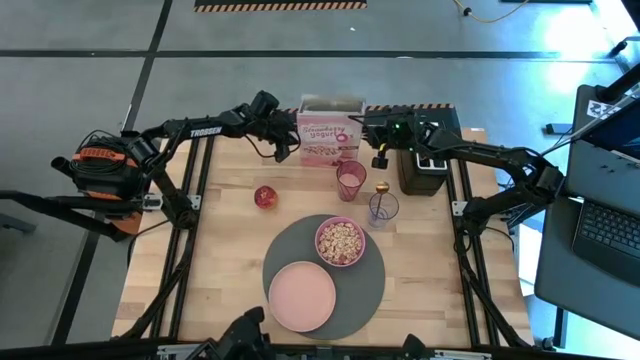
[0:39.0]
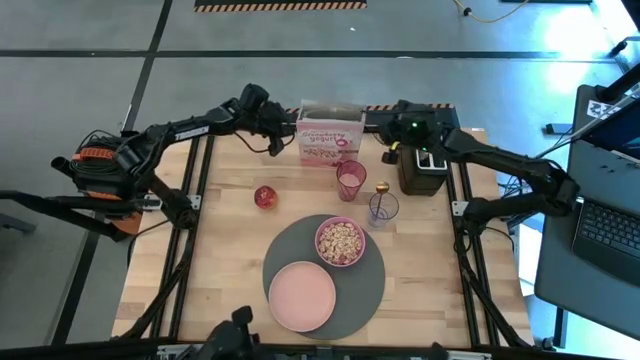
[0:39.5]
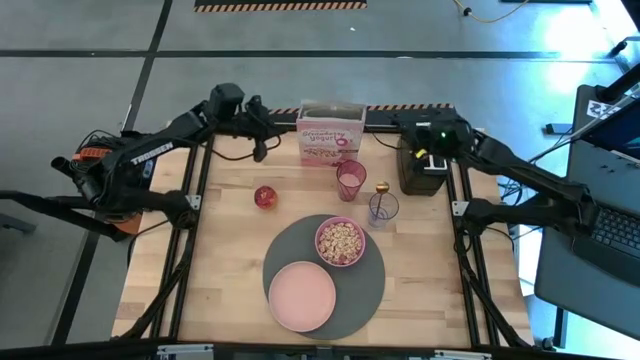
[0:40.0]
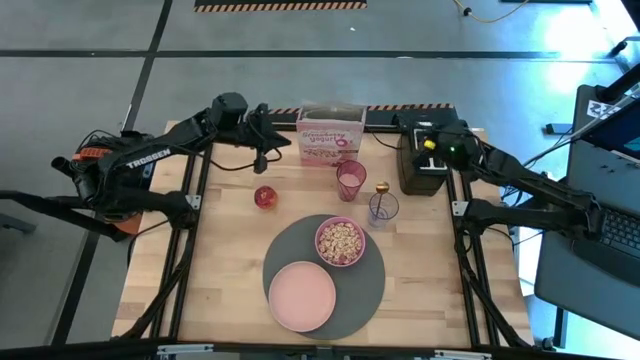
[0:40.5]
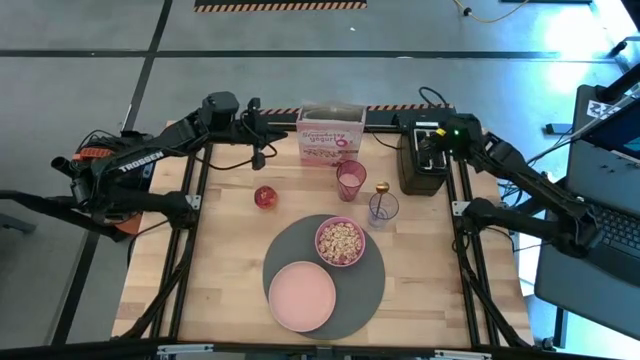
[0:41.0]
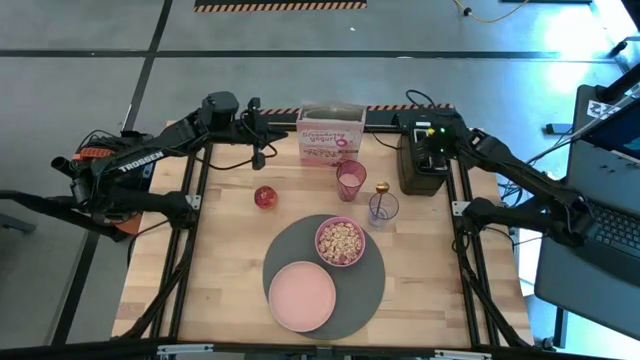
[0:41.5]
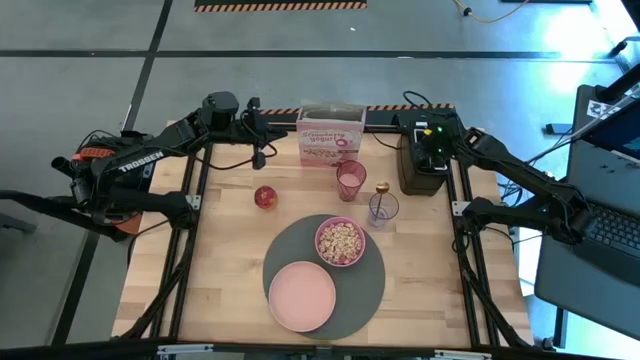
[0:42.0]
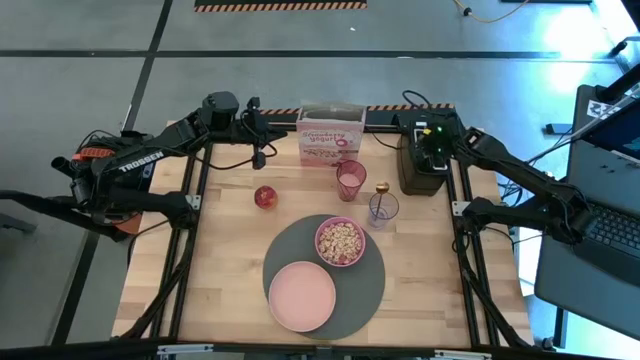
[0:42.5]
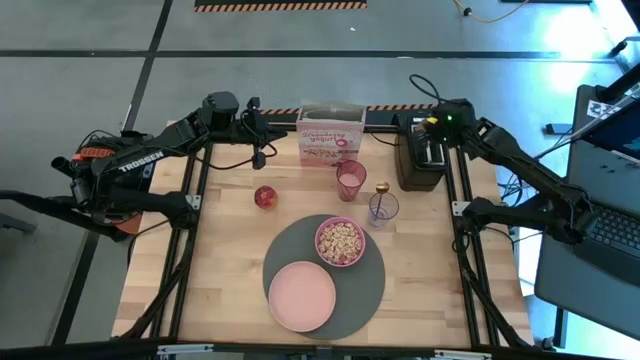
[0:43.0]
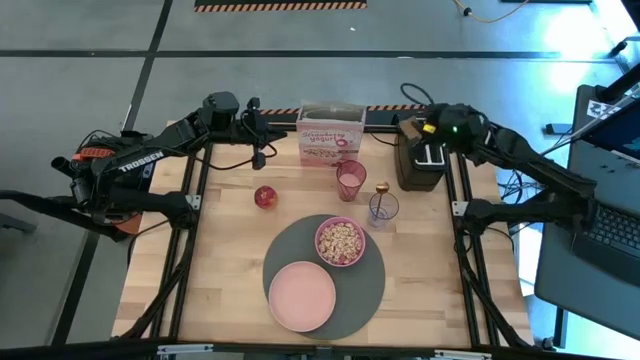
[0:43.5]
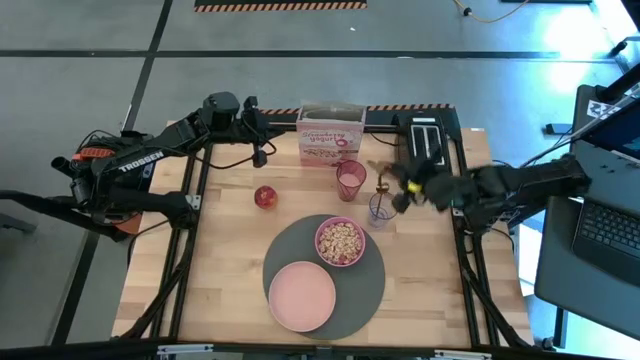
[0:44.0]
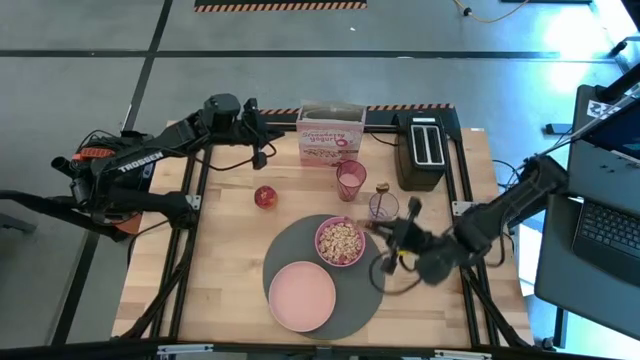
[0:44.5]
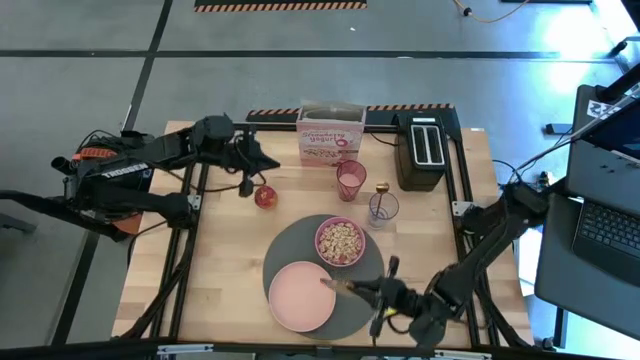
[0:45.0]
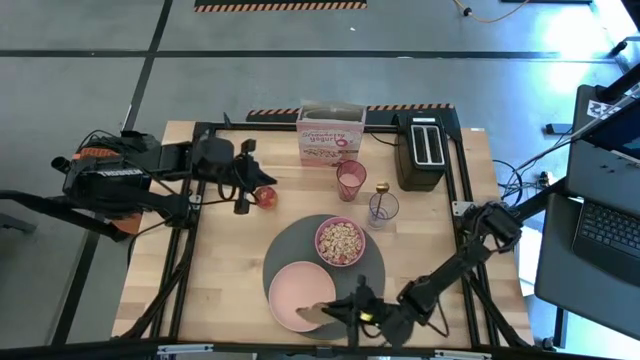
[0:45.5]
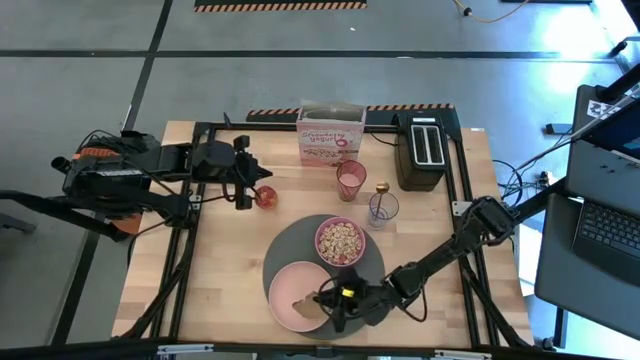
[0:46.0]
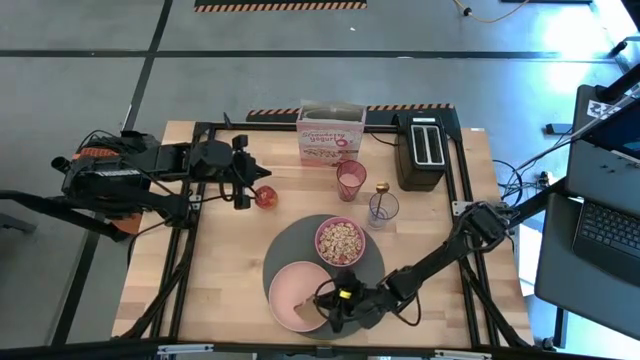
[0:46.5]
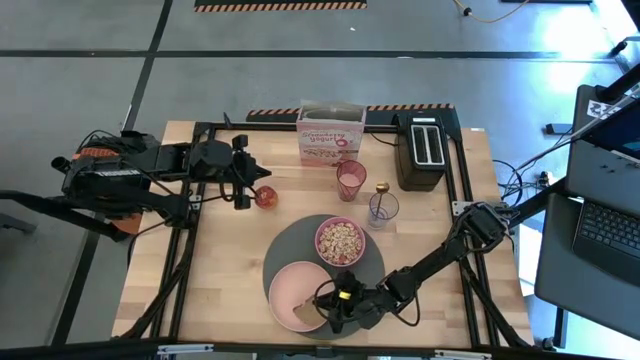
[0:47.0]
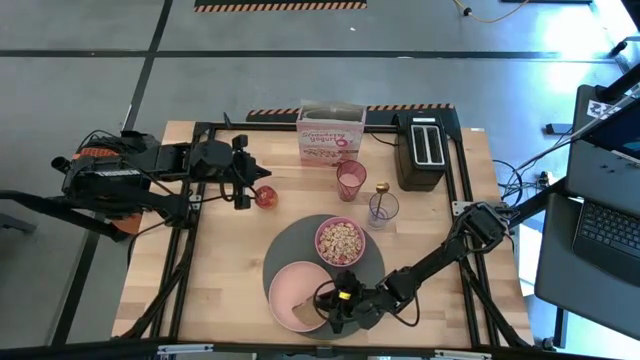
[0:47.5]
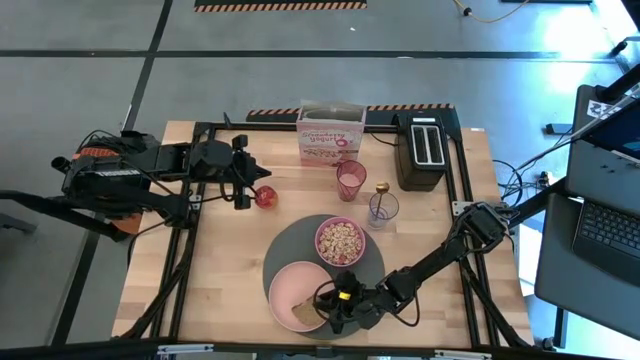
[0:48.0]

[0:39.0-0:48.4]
Task: Arrange a breakfast setting
Put the brown bread on the pink plate

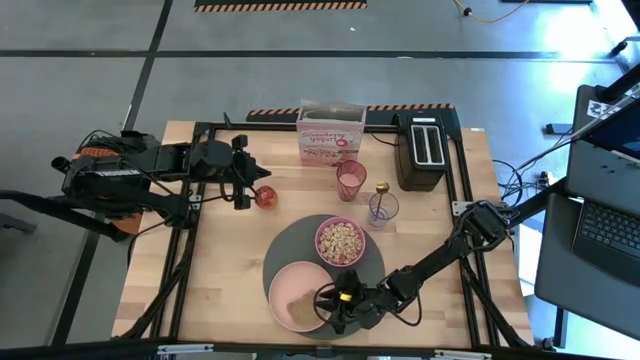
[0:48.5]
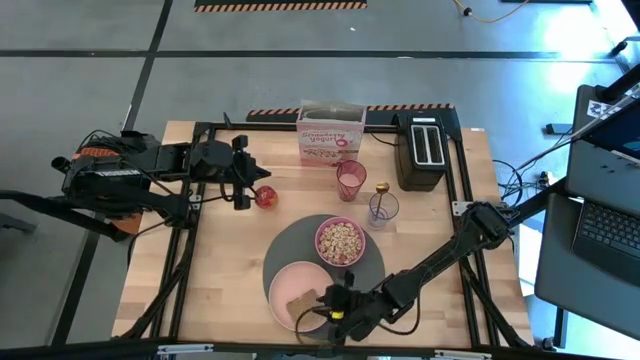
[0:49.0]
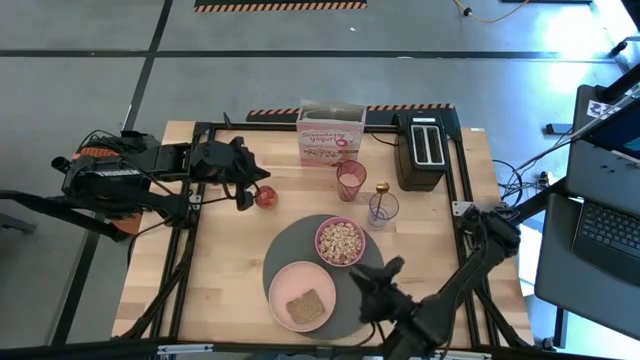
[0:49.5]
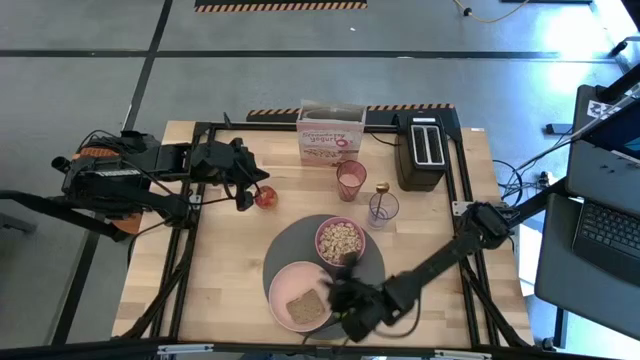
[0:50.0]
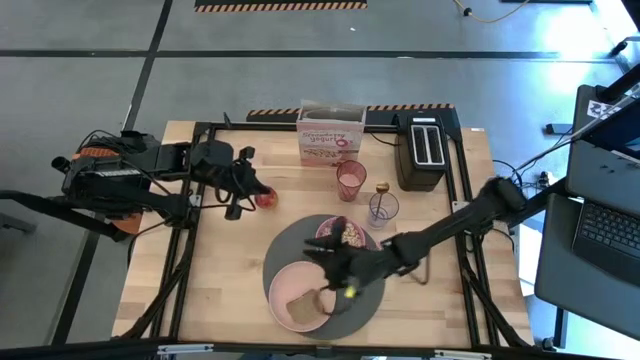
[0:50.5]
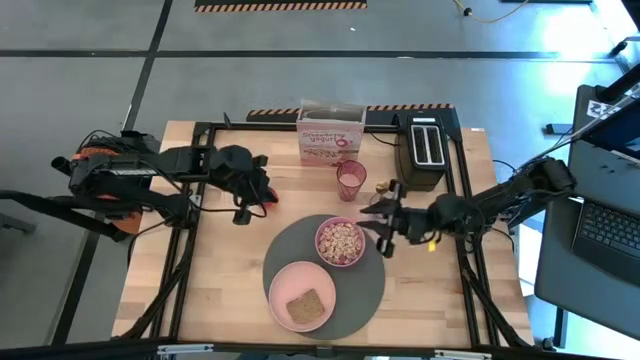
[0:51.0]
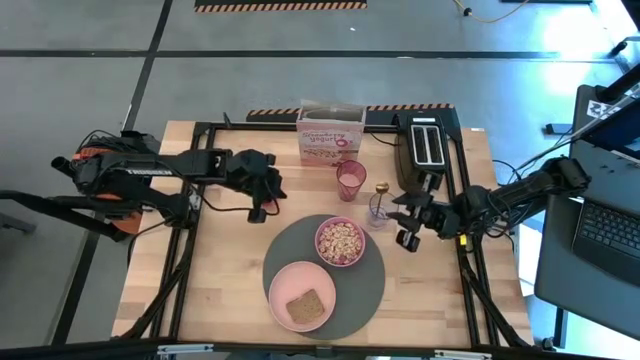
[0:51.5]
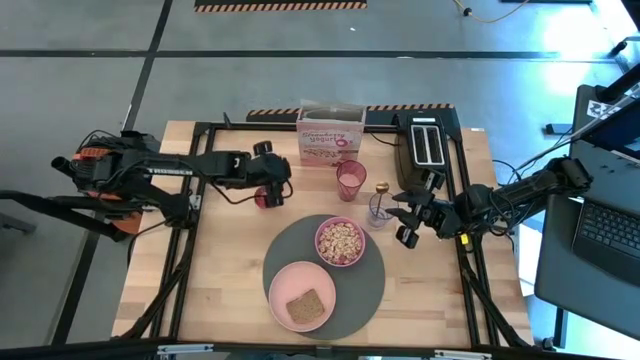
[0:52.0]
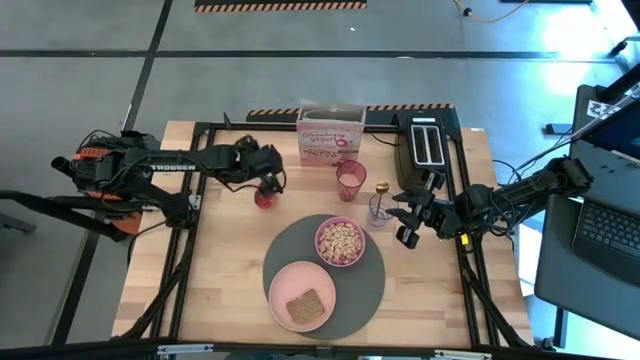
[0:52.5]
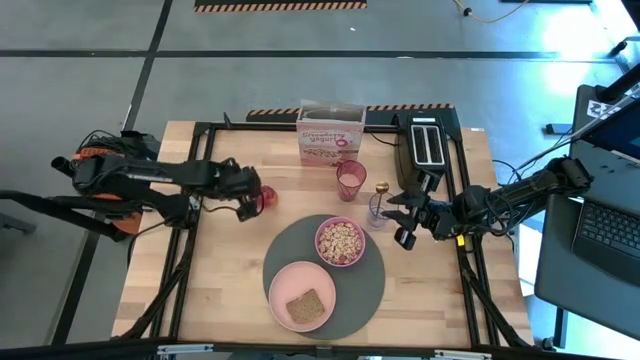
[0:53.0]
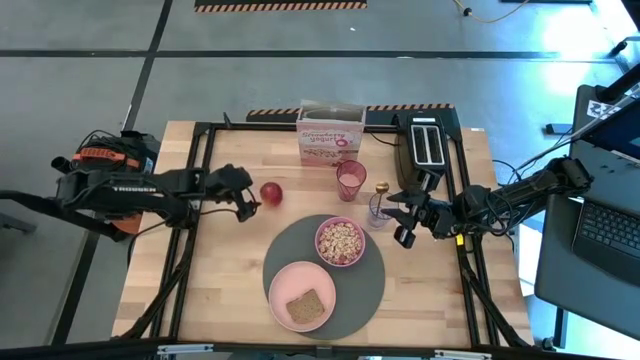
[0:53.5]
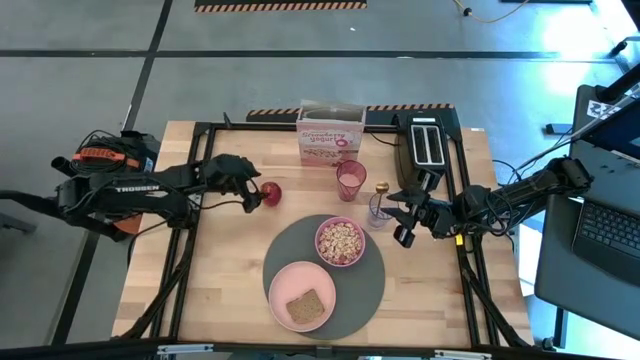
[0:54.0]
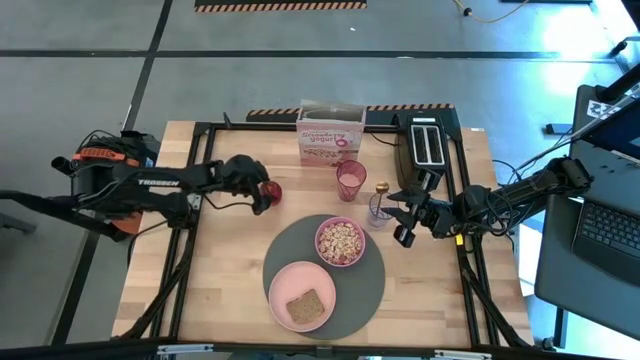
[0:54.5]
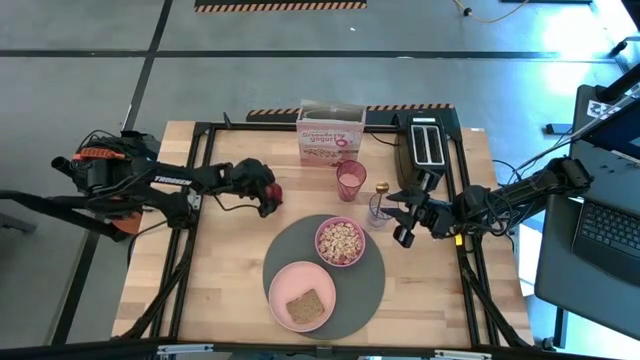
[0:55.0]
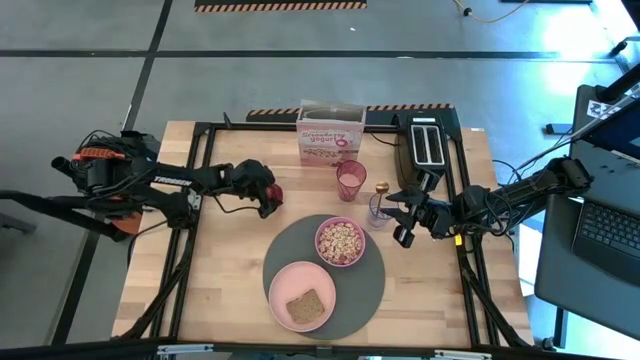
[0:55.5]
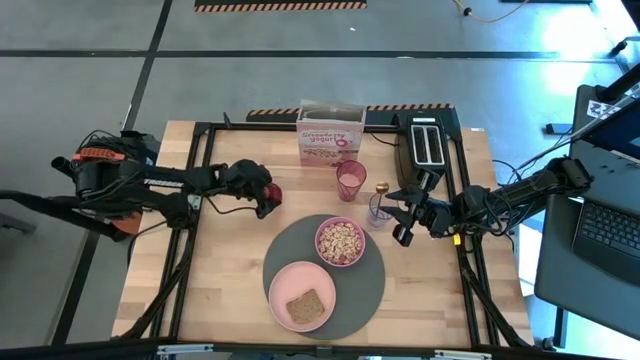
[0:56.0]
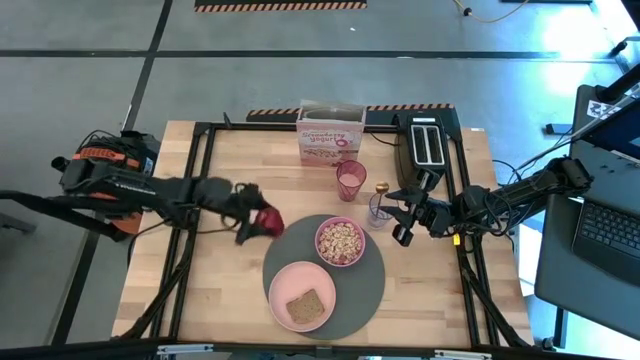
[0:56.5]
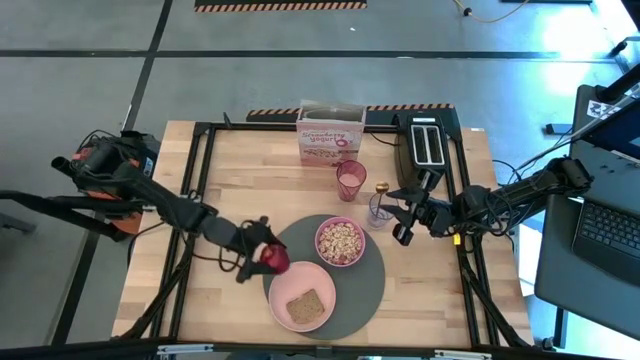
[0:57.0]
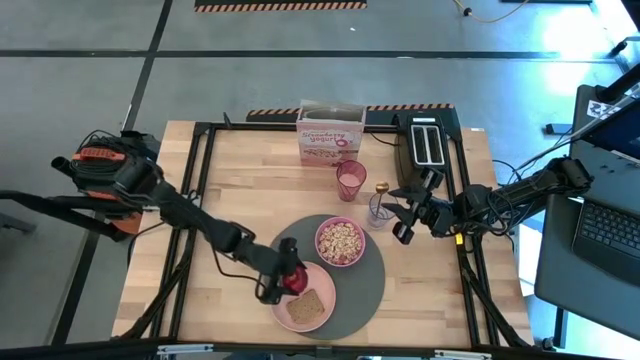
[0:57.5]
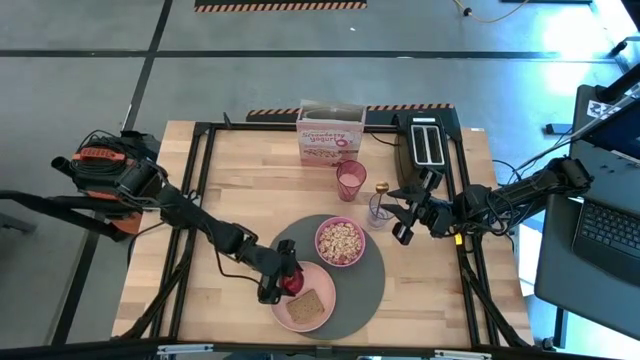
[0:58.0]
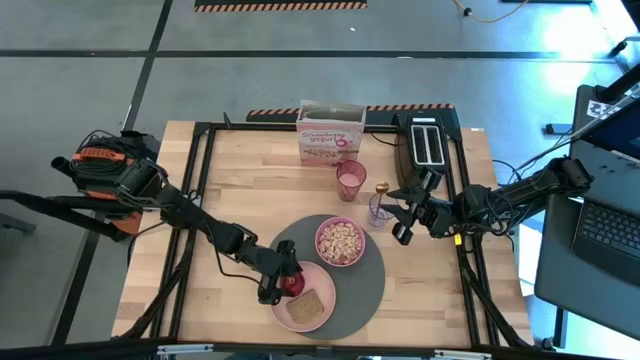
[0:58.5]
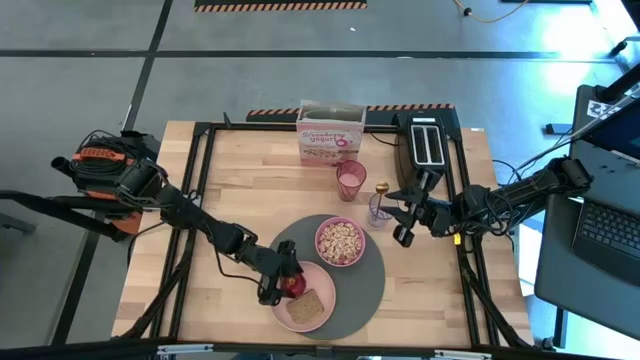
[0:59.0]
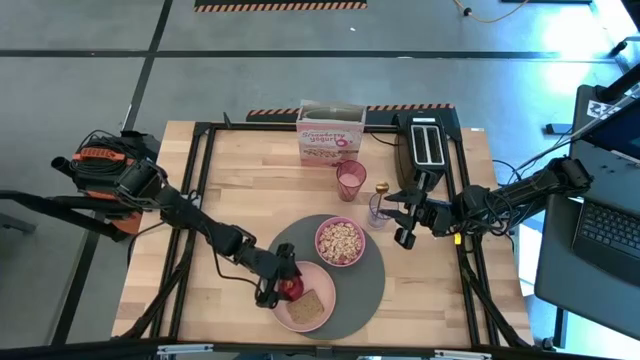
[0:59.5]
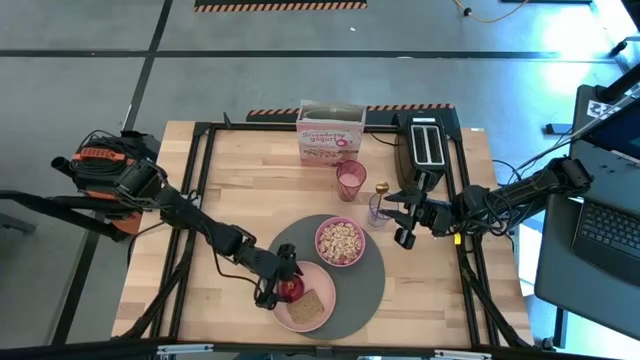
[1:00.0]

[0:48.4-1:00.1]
Put the red apple on the pink plate to the left of the brown bread
